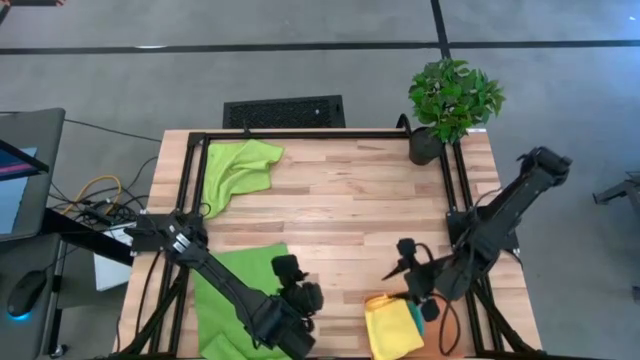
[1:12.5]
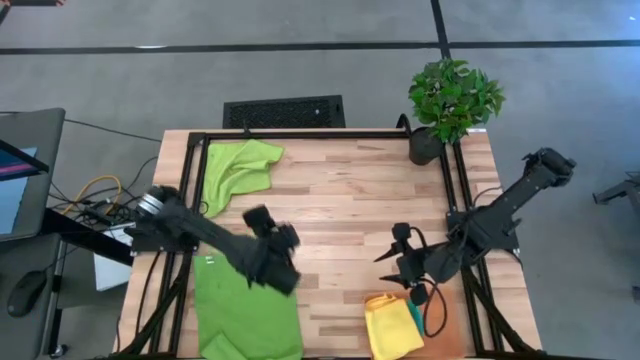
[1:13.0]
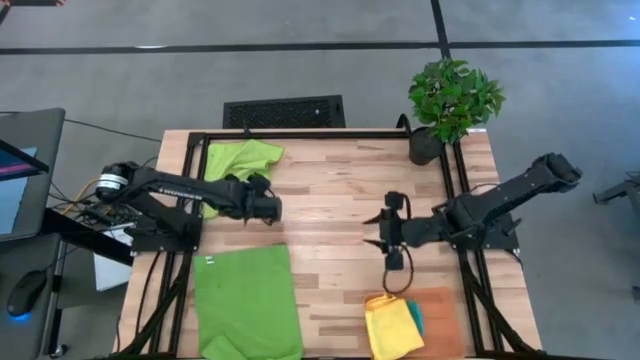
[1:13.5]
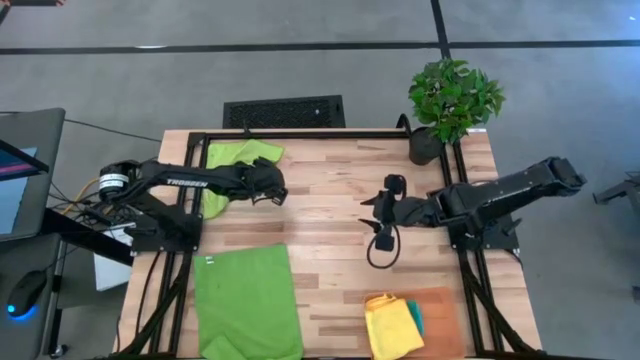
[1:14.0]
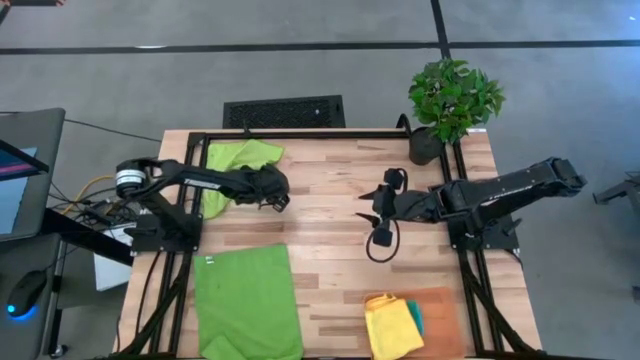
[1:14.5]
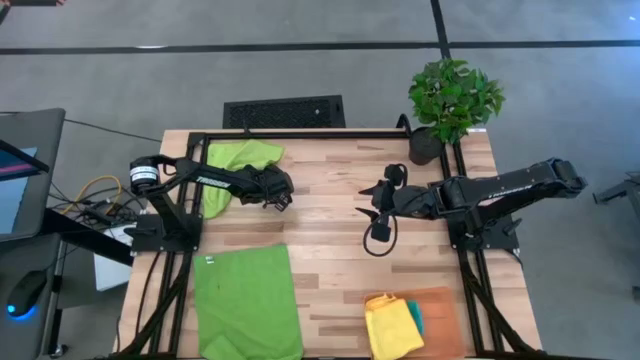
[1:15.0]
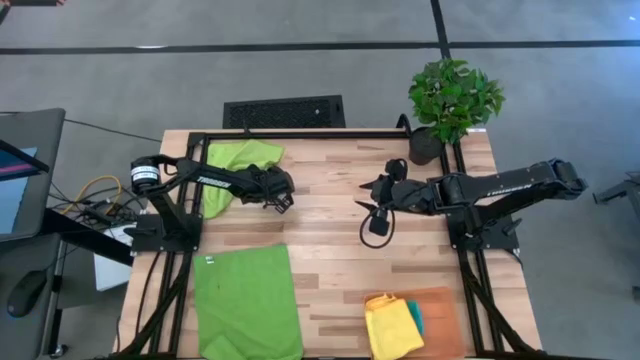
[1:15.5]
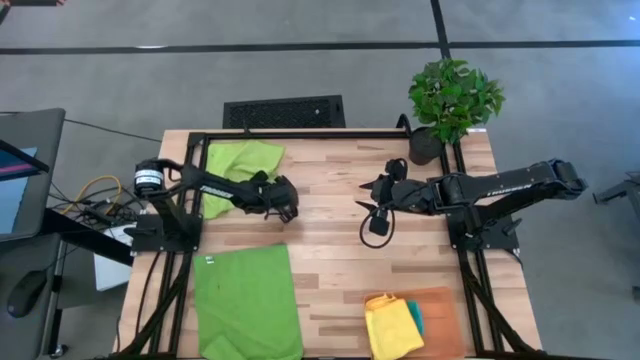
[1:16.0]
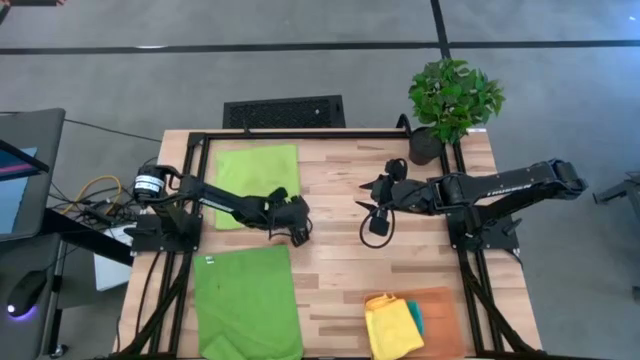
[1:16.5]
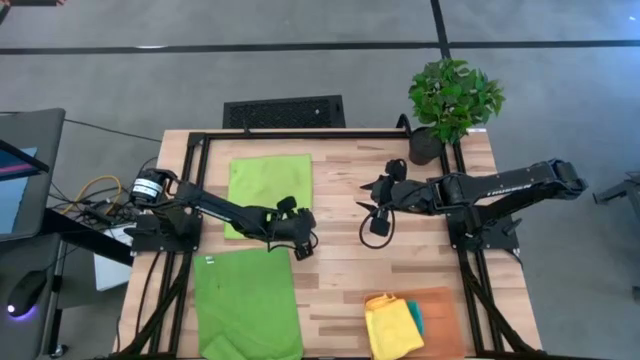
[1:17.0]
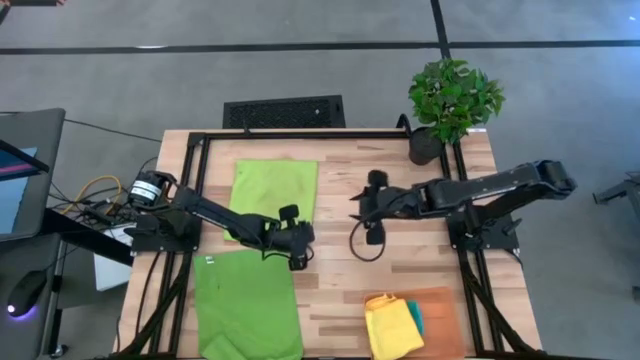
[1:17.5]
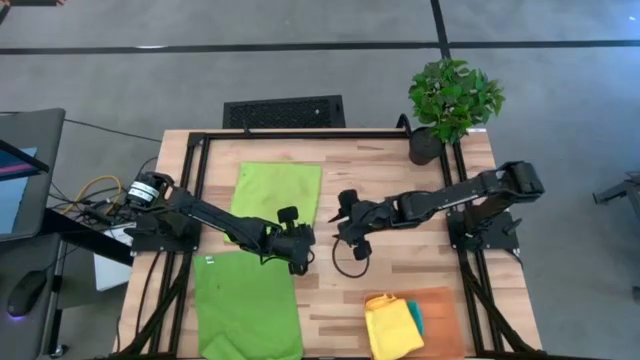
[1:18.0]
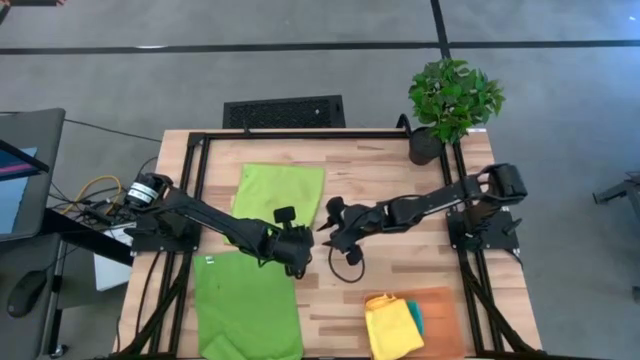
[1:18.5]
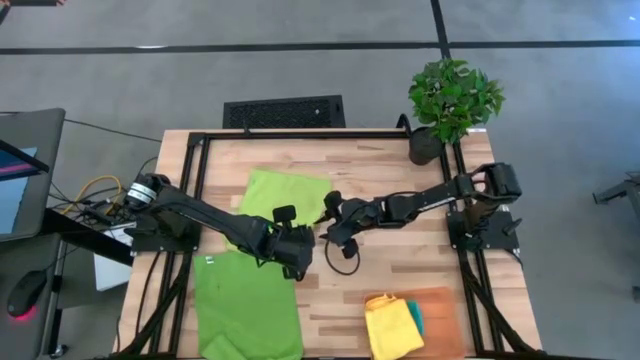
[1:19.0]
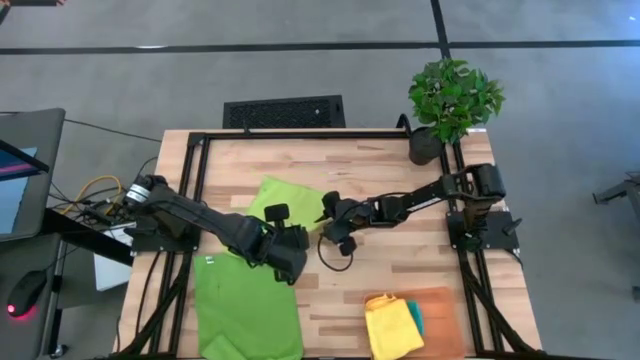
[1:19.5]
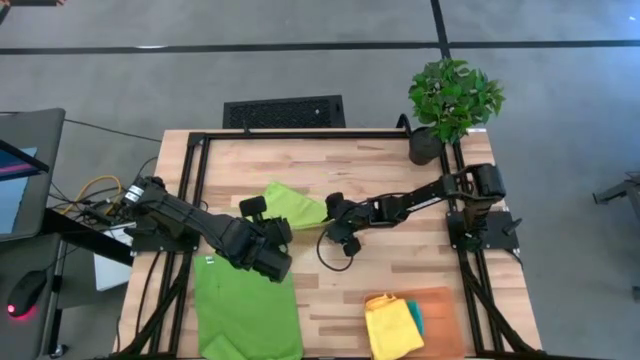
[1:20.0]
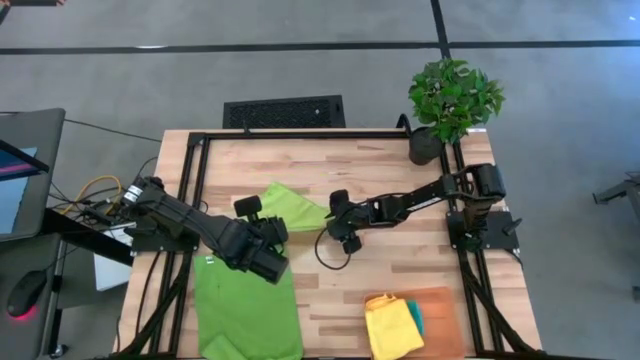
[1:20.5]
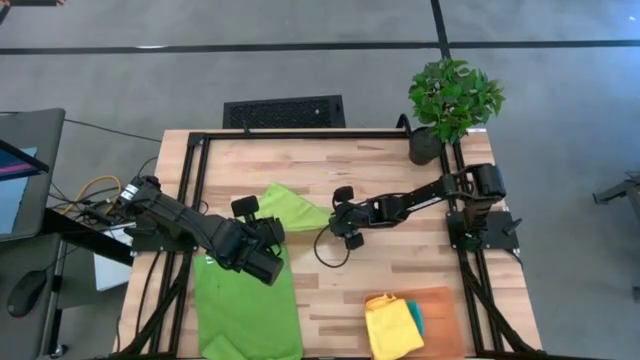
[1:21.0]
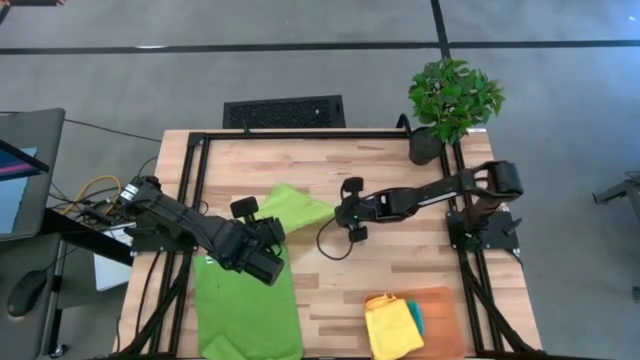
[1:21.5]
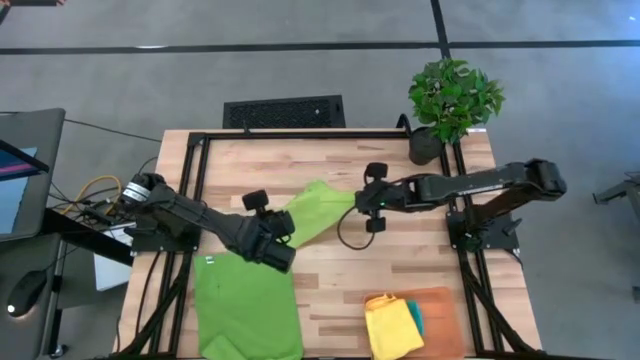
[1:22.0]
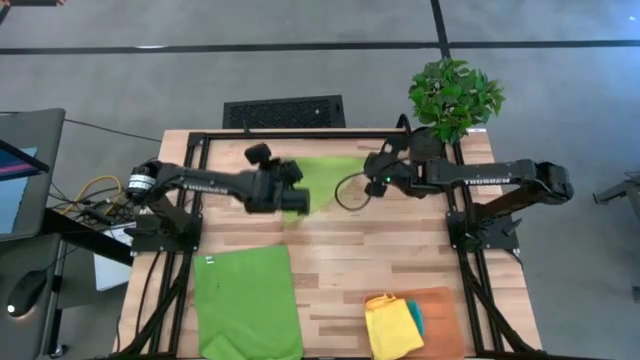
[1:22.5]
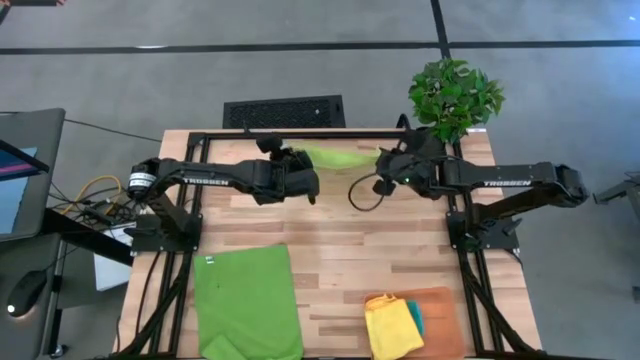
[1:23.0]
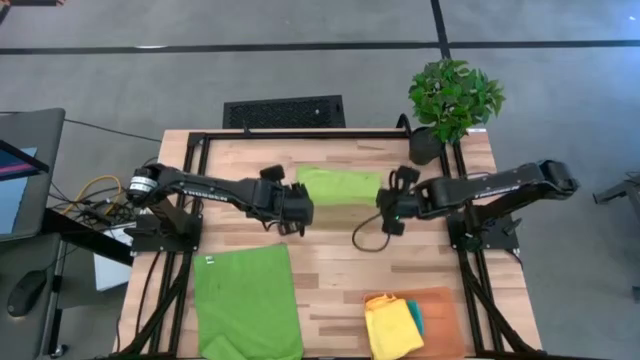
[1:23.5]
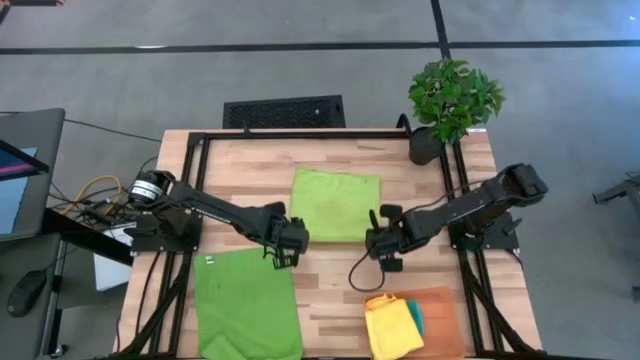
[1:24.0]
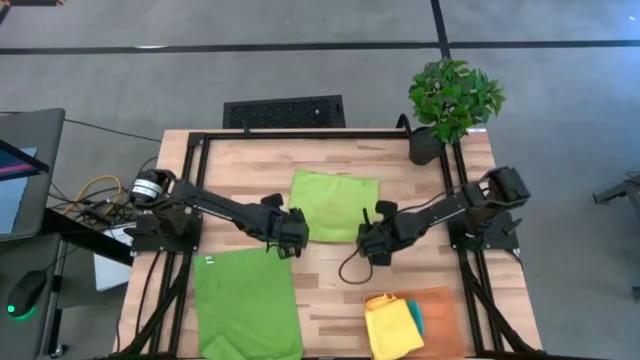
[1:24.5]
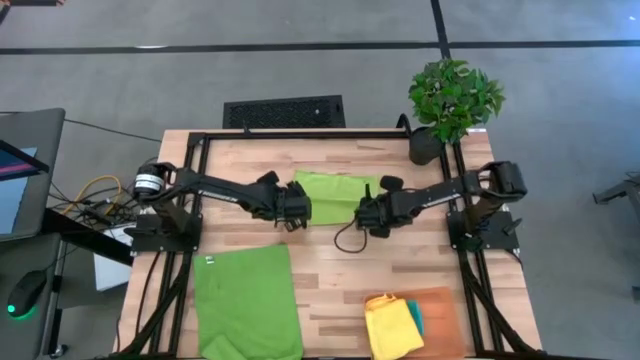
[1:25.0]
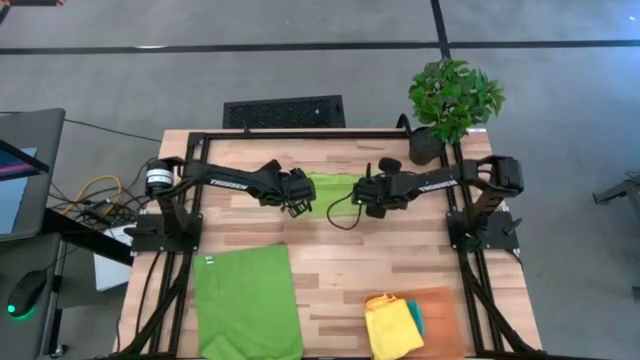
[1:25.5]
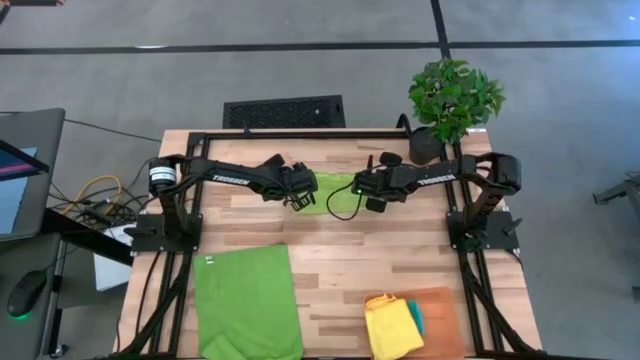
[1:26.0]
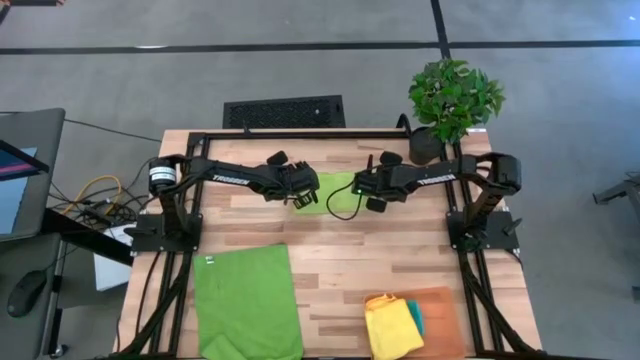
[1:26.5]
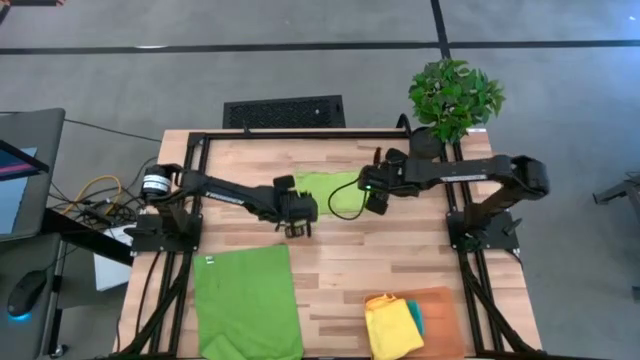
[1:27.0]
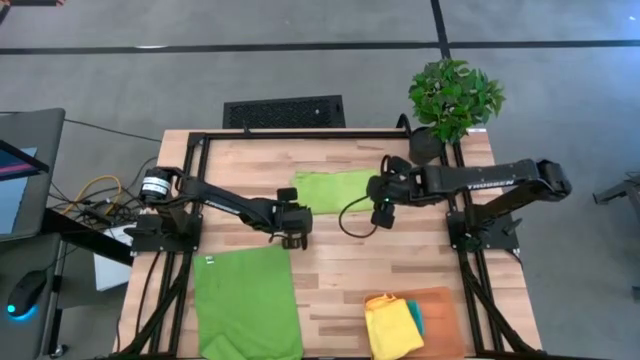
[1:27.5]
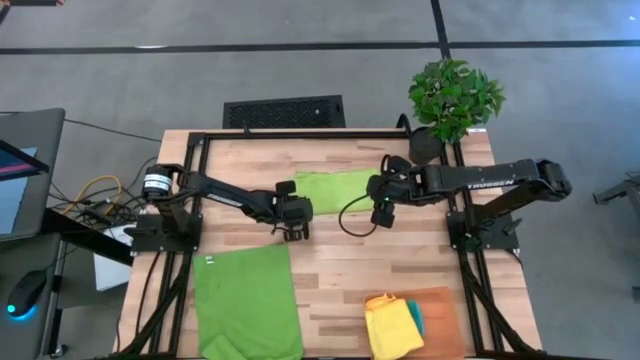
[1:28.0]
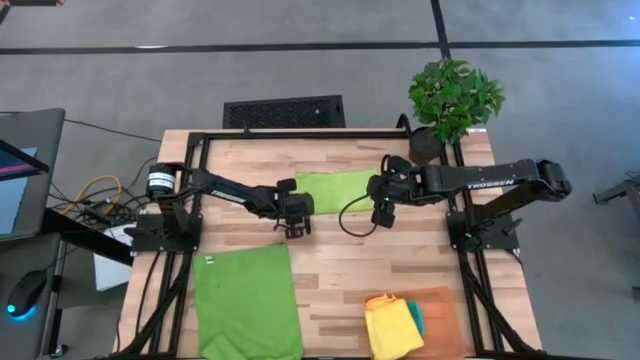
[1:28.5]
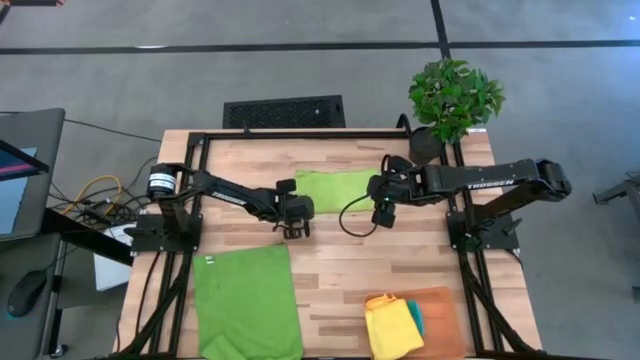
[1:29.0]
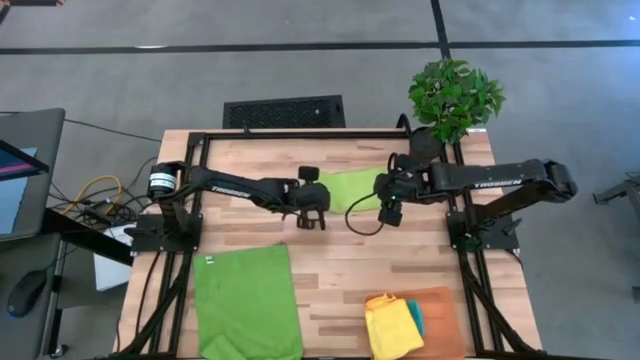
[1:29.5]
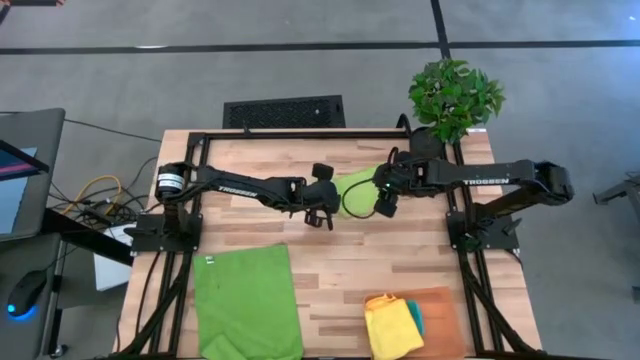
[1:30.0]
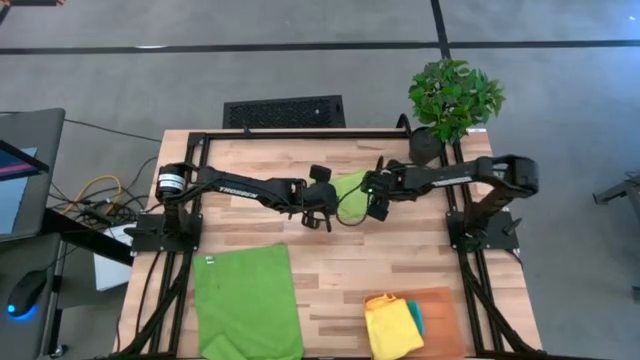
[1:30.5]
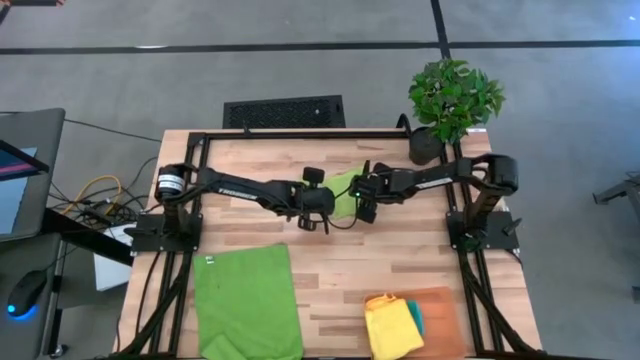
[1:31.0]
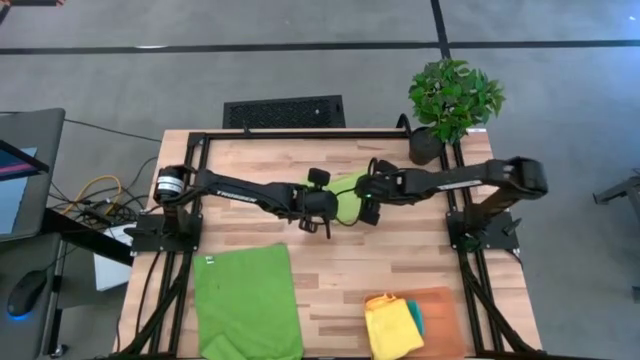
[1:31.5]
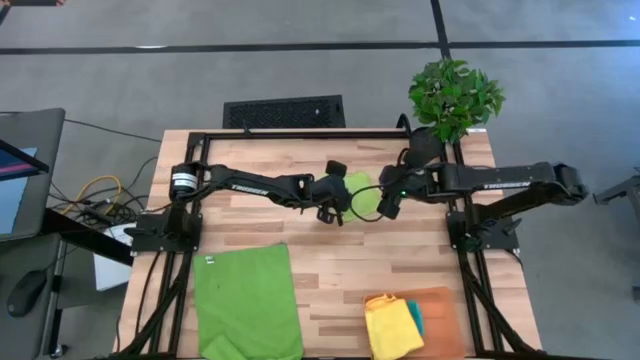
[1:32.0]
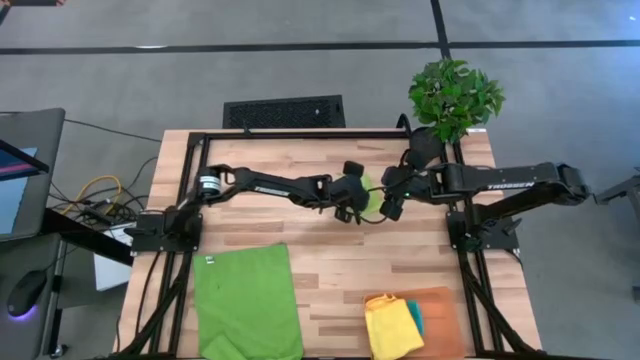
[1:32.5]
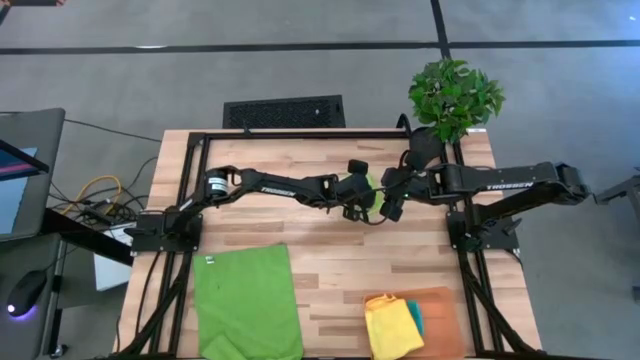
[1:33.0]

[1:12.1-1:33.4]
Task: Fold microfiber towels
Fold the light green microfiber towel
